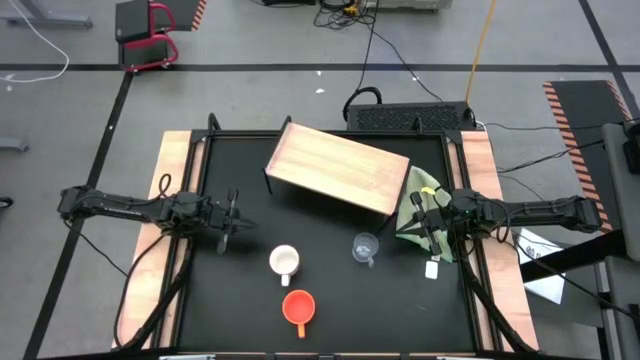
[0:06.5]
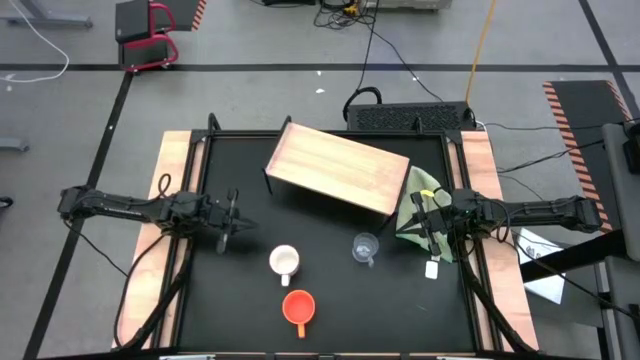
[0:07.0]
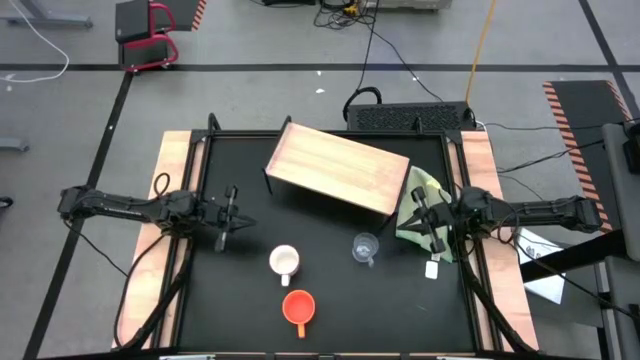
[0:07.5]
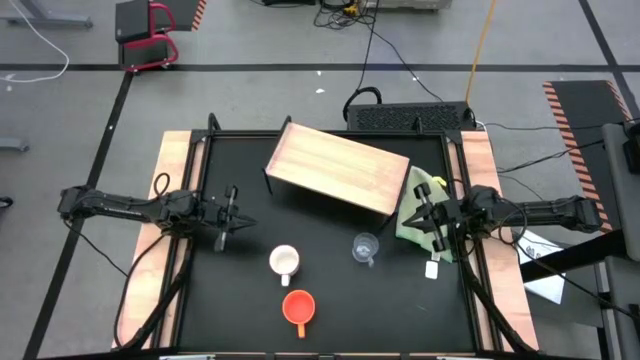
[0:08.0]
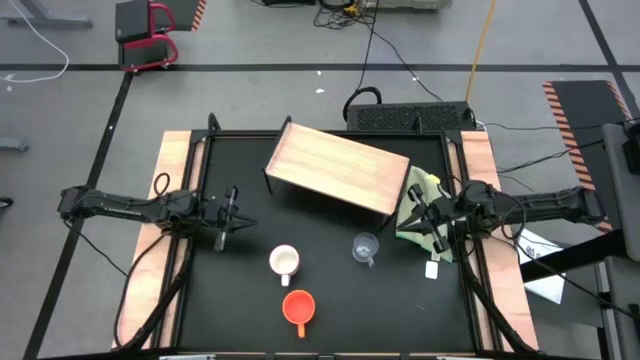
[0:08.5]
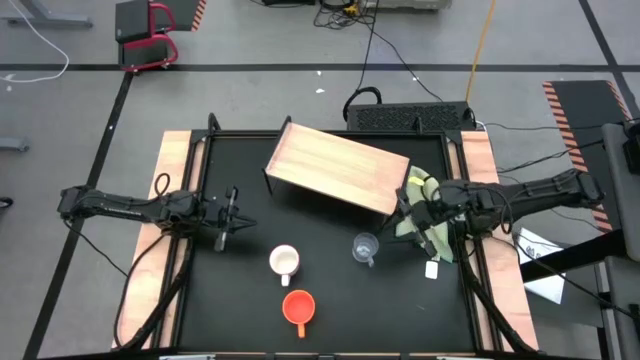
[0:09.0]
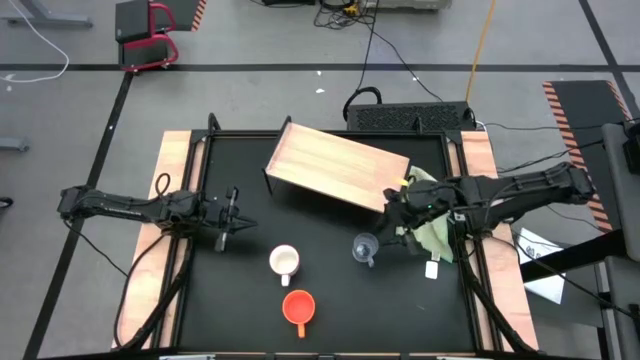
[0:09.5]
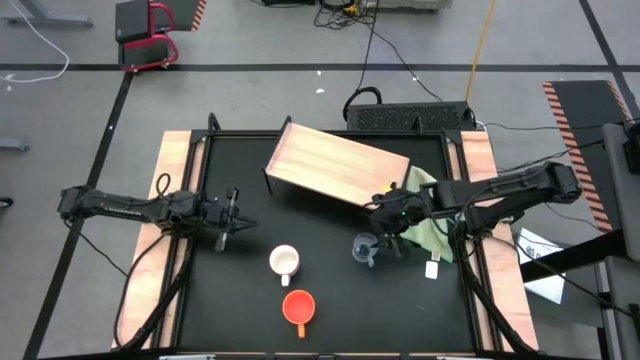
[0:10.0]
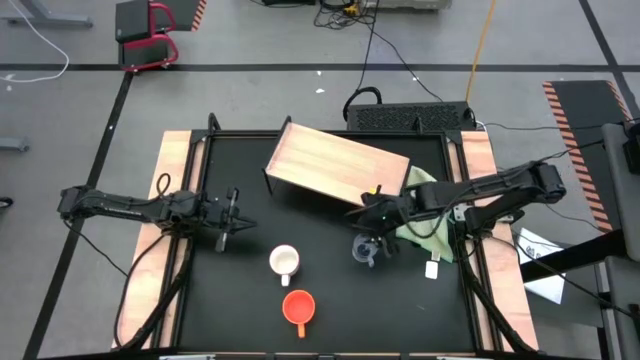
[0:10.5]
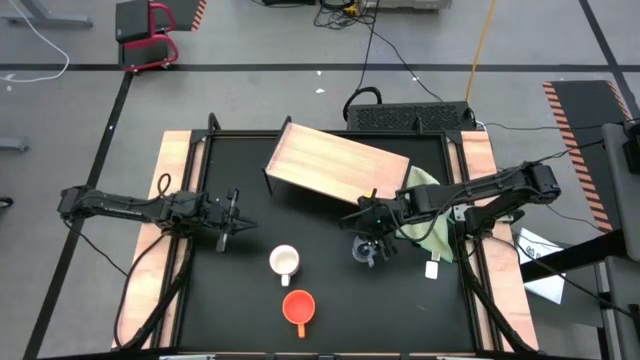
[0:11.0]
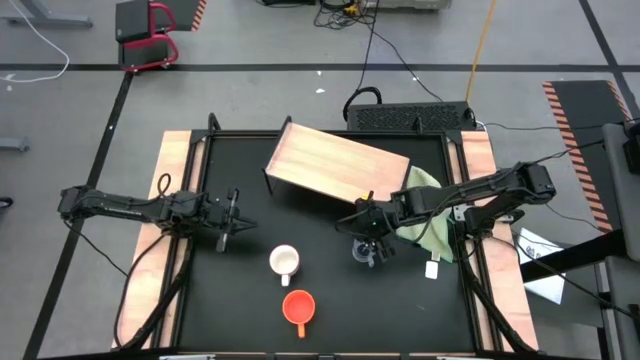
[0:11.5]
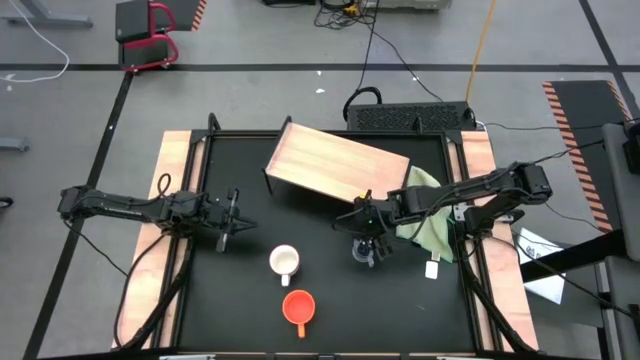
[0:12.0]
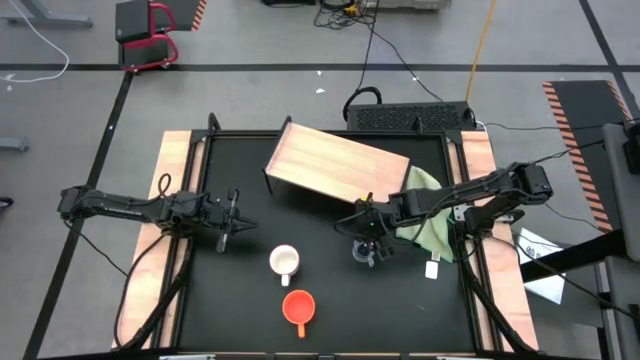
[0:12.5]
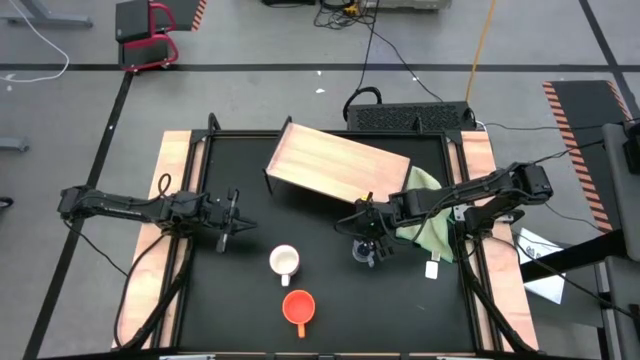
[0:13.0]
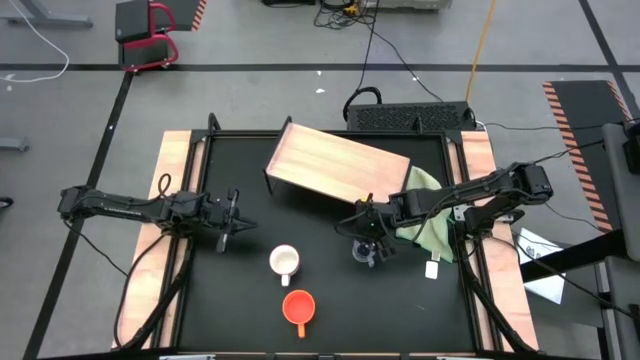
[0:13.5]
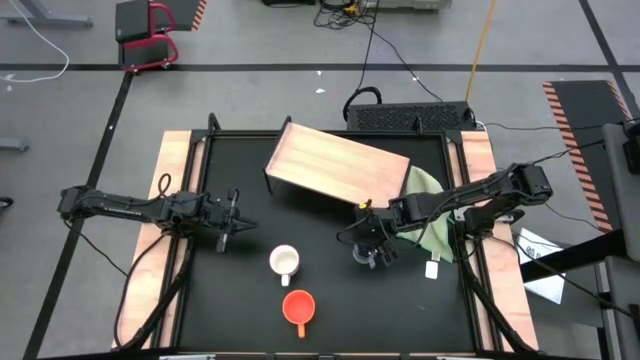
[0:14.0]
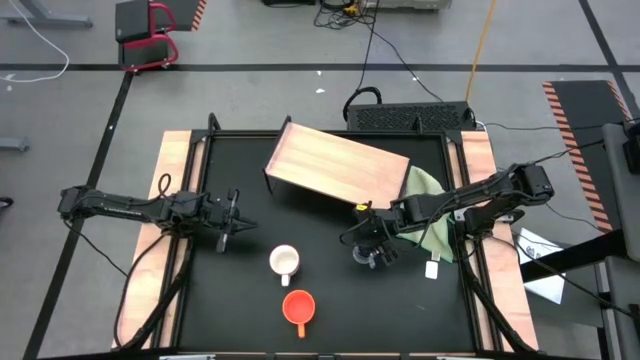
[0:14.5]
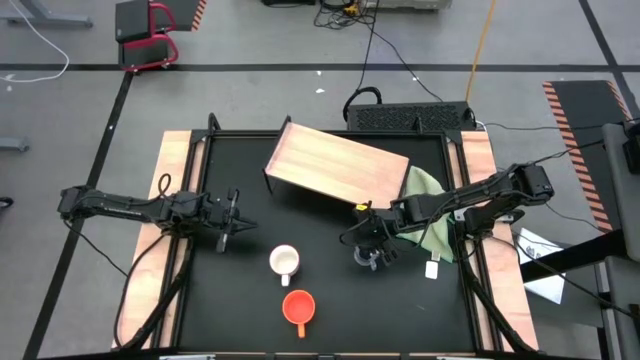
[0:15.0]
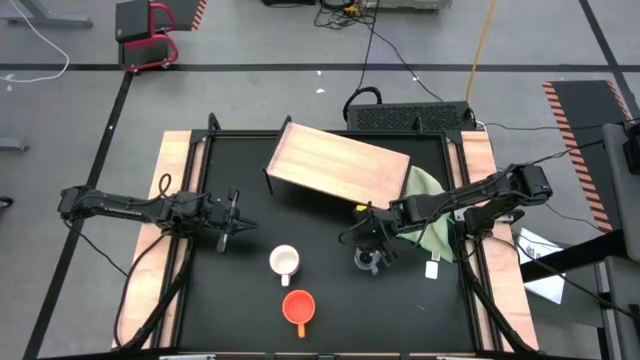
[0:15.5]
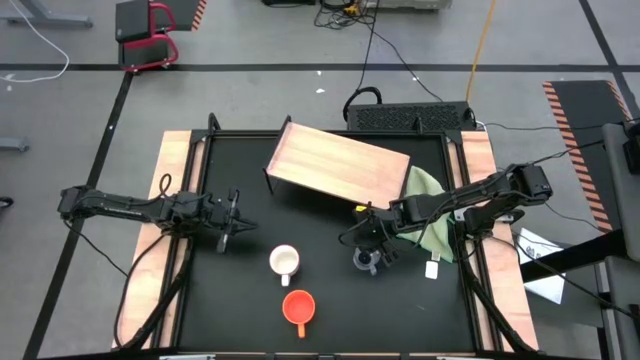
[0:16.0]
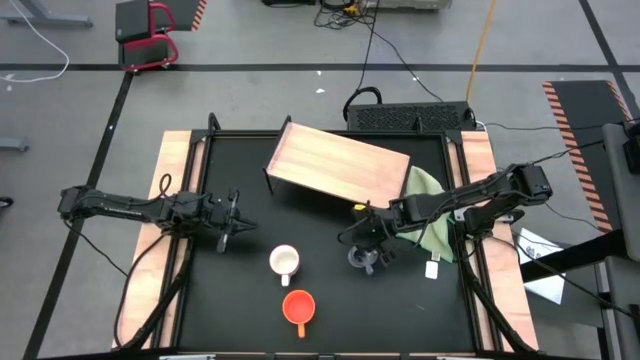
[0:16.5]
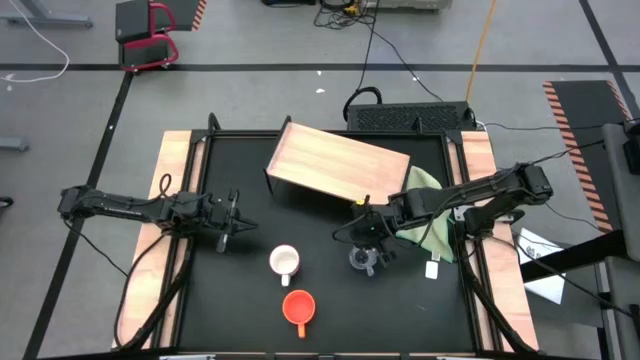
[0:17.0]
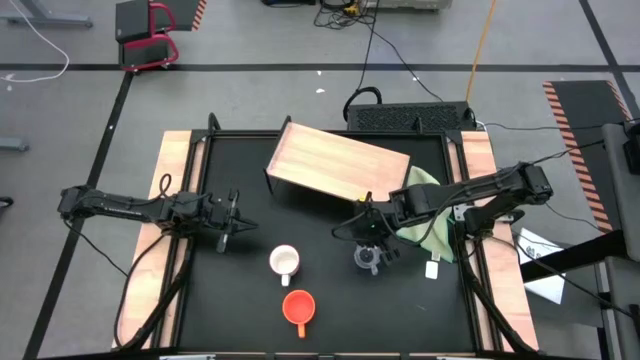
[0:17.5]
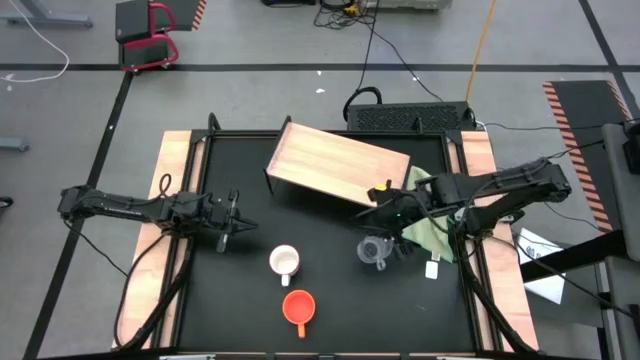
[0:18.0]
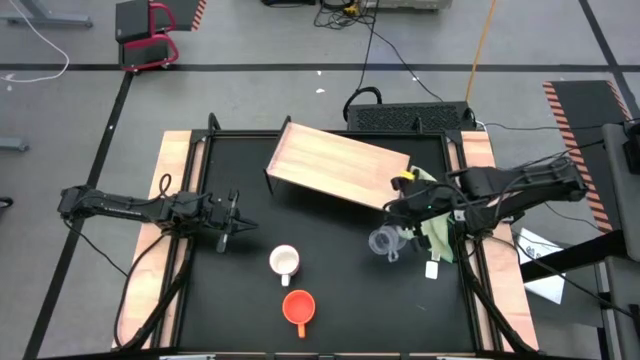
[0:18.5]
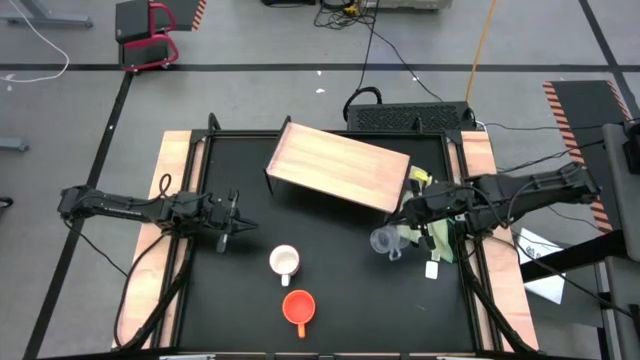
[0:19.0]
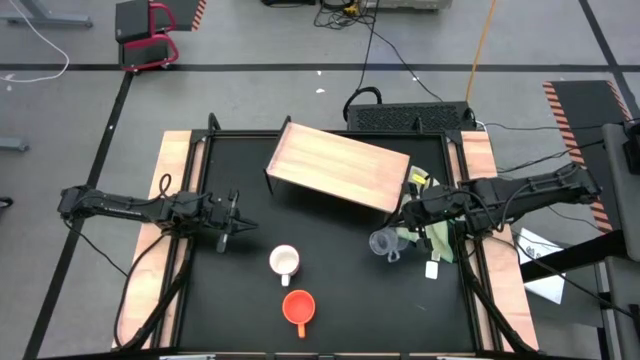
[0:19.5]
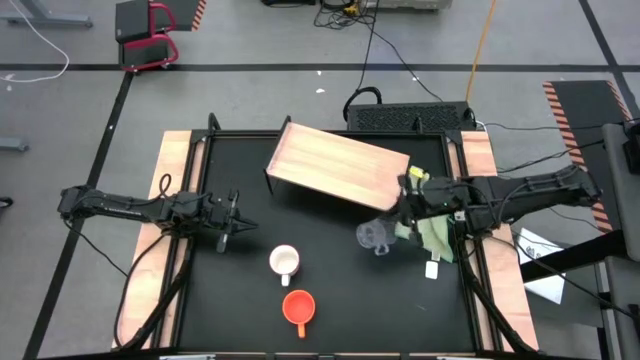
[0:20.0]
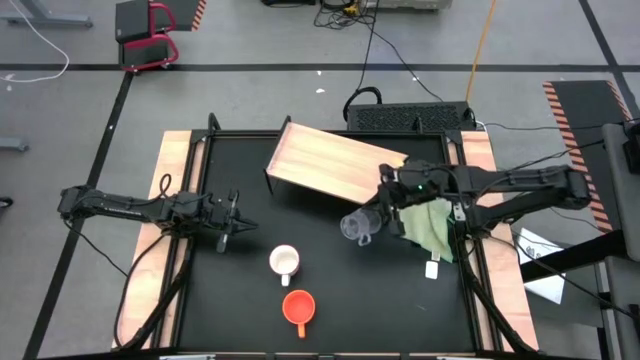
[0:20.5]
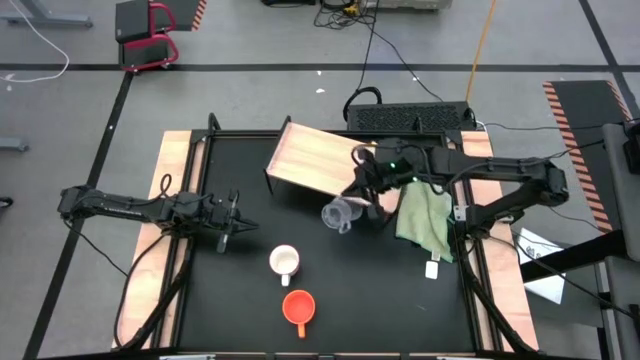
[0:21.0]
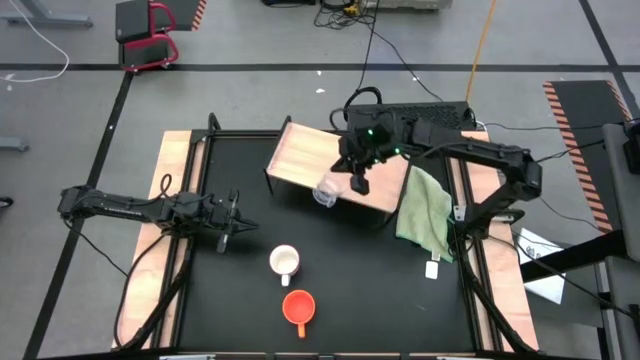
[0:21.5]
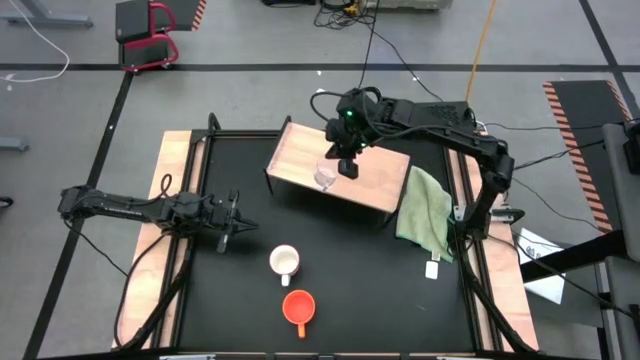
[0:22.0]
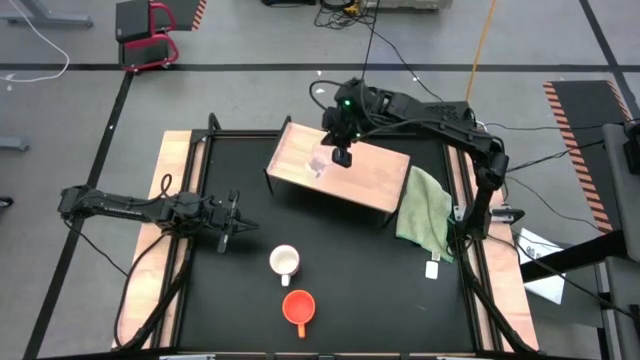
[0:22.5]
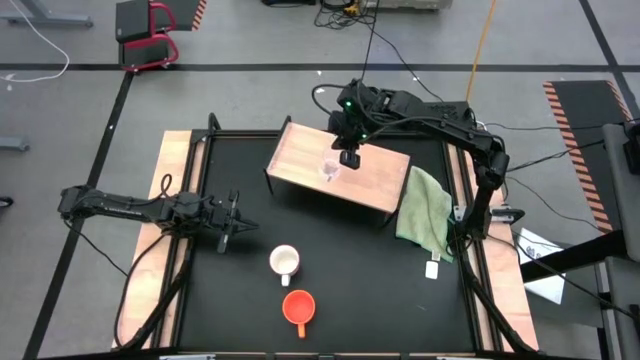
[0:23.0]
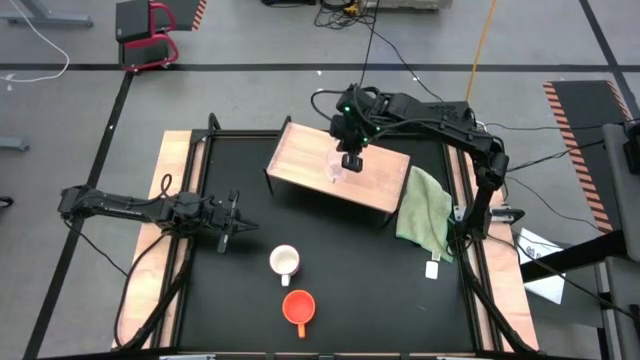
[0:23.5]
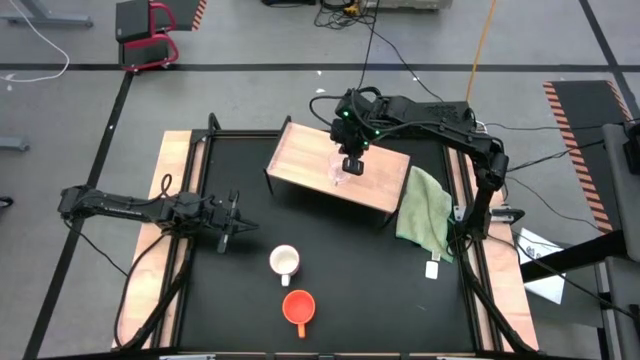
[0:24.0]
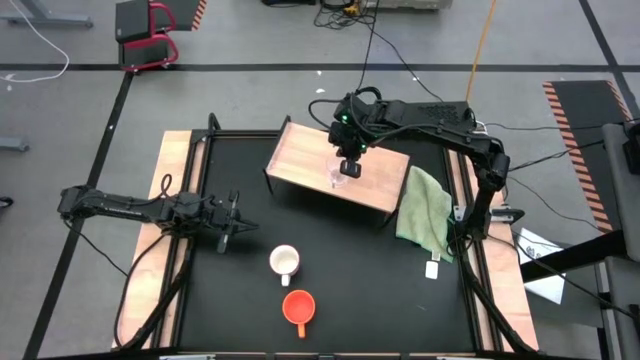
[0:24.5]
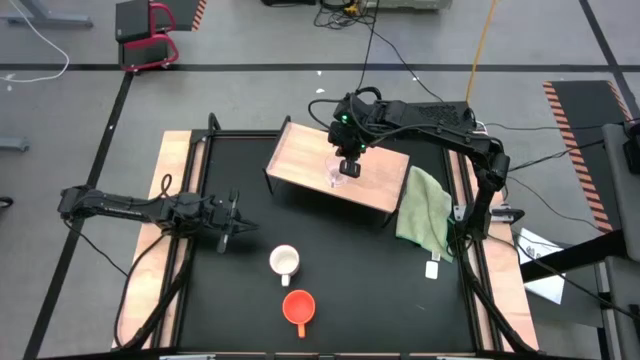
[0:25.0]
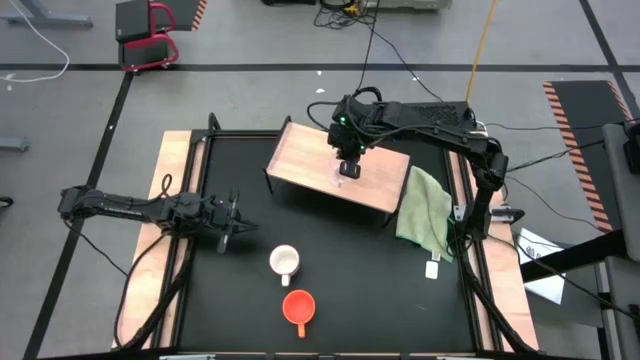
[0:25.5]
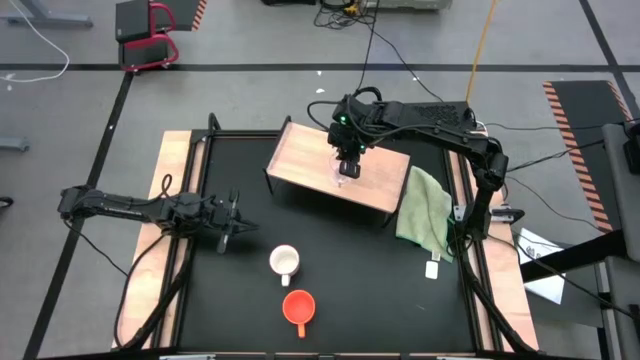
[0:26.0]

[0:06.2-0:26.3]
Task: Stack small to large cups/mugs on shelf
Put the transparent mug on the shelf
